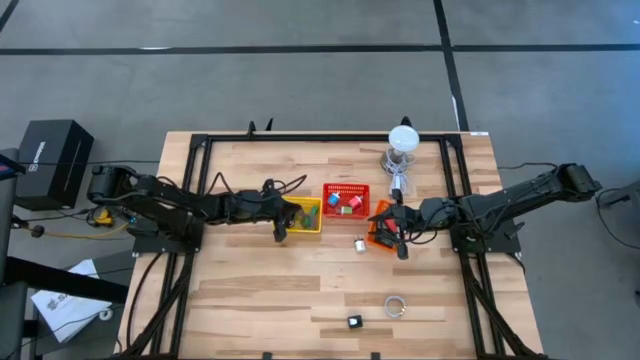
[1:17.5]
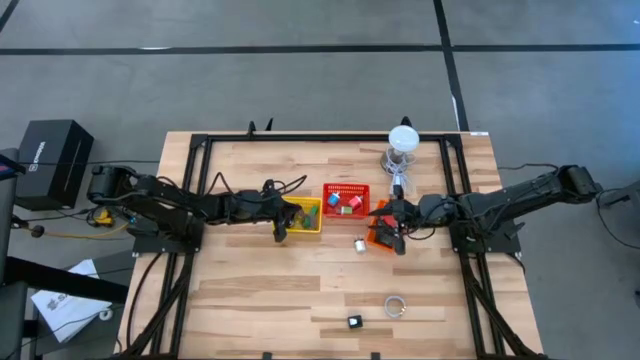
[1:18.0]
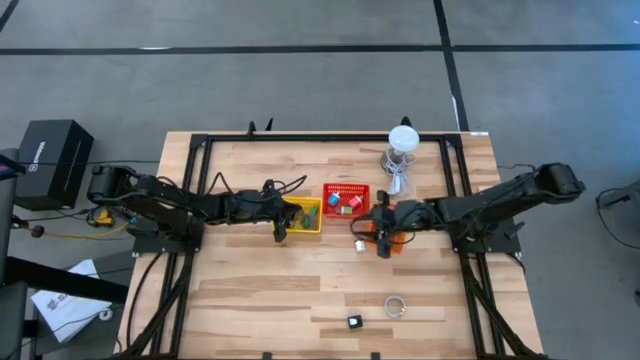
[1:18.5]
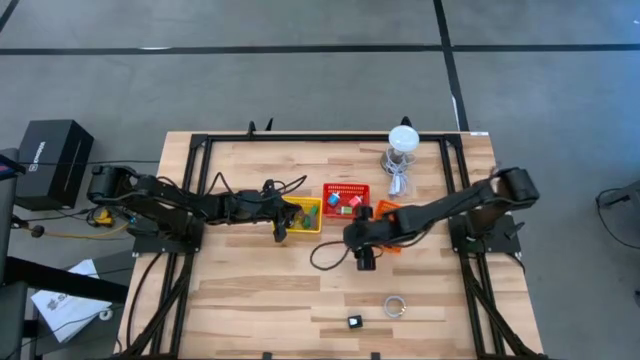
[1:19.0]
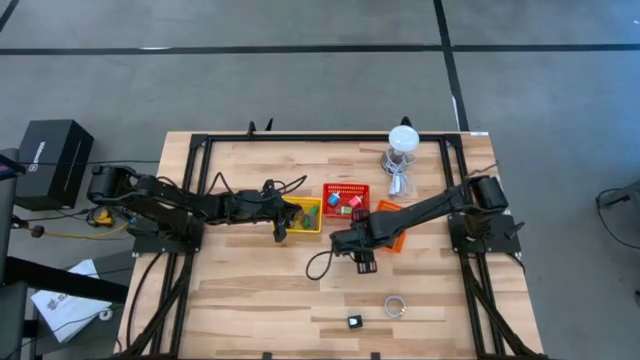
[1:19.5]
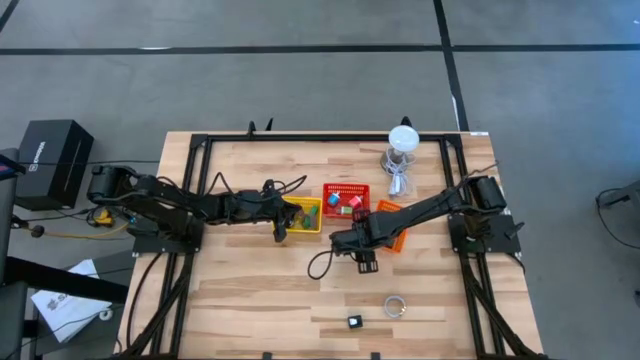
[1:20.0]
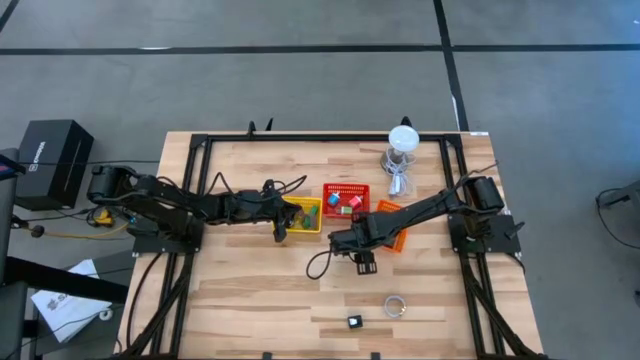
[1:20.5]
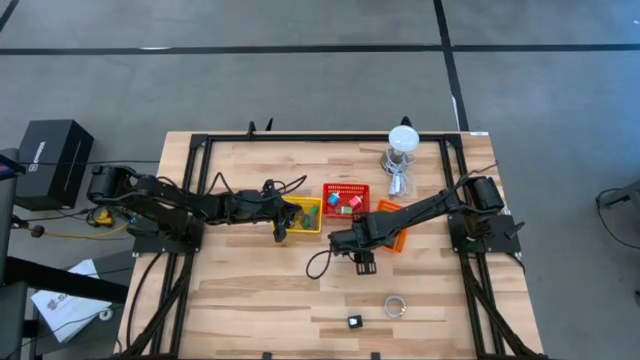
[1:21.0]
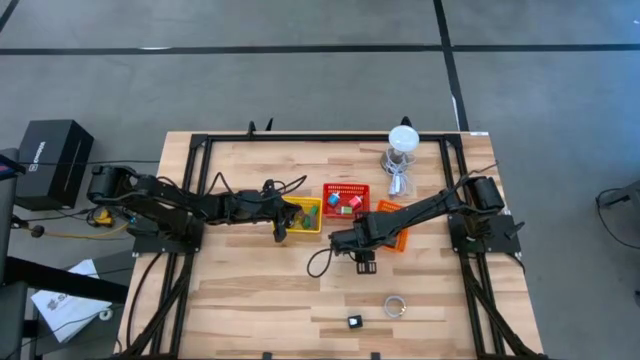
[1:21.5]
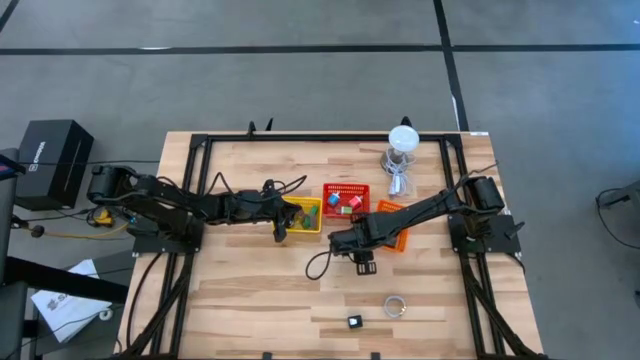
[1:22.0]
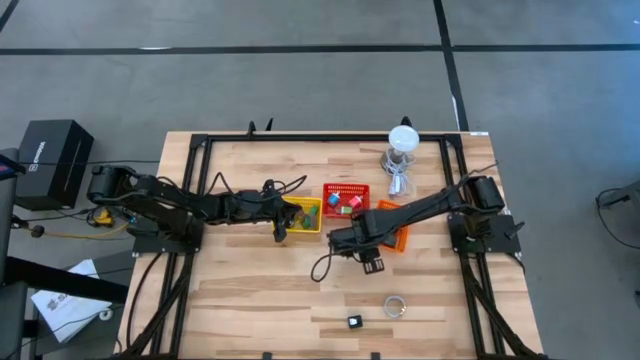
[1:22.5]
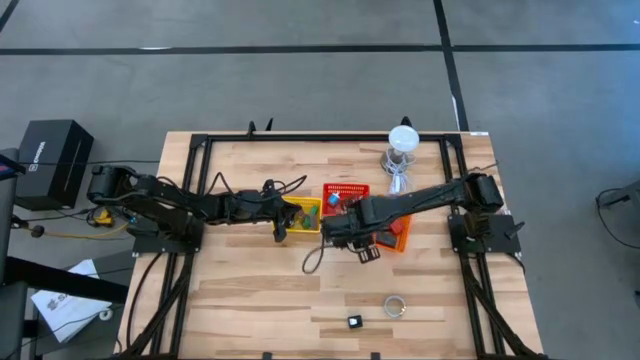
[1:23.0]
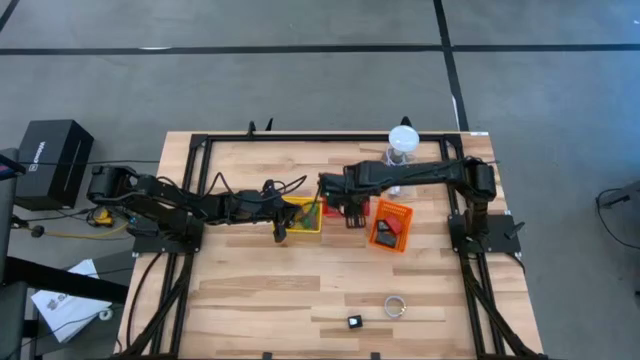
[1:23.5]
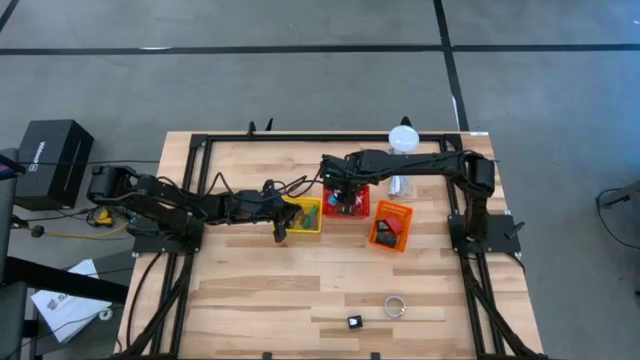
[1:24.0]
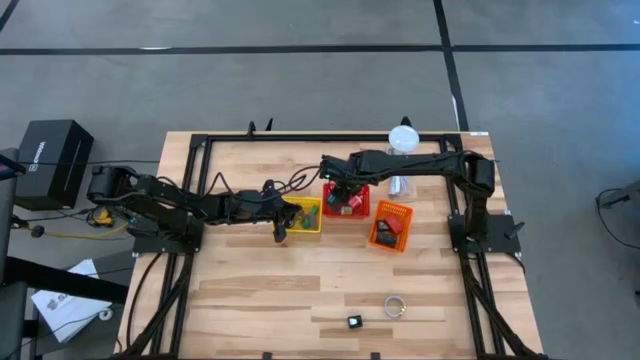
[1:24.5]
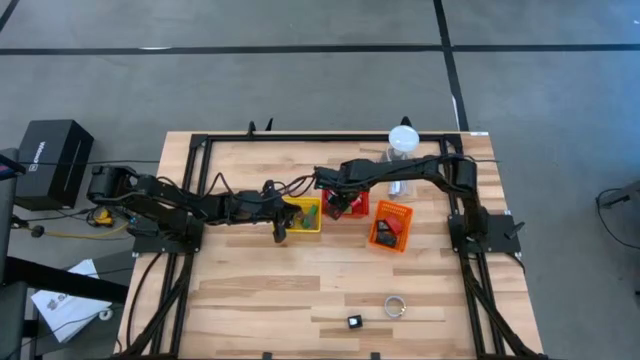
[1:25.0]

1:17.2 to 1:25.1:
Task: Pick & Place Office items
Put the white charger adapter into the red bin

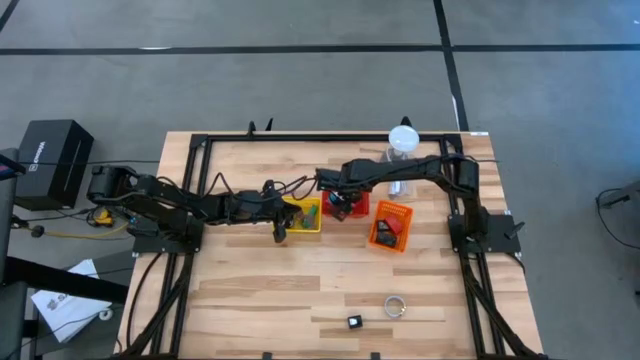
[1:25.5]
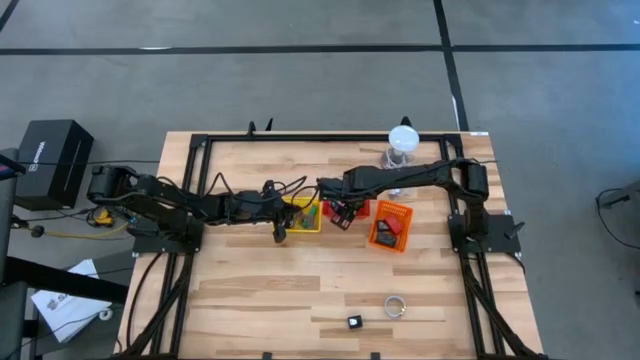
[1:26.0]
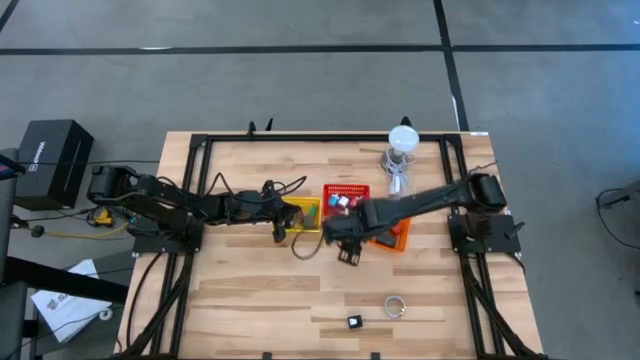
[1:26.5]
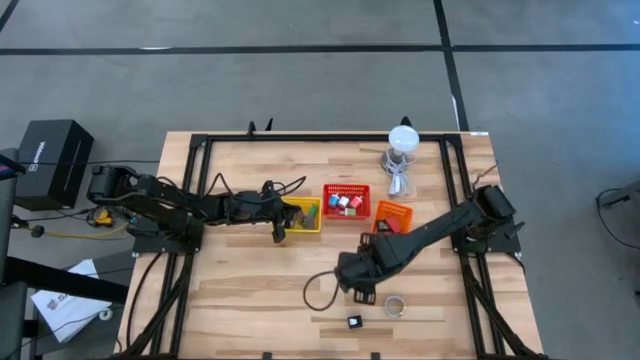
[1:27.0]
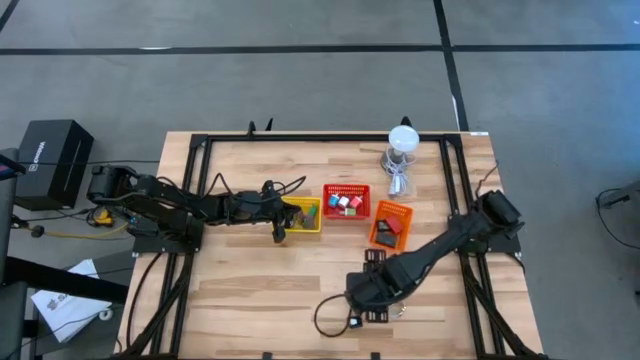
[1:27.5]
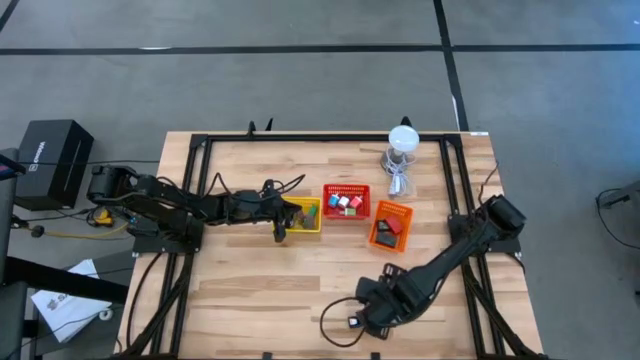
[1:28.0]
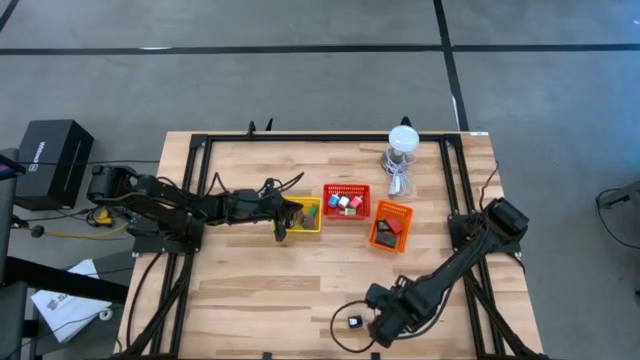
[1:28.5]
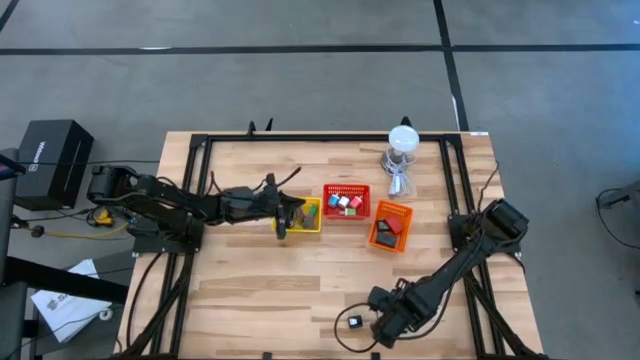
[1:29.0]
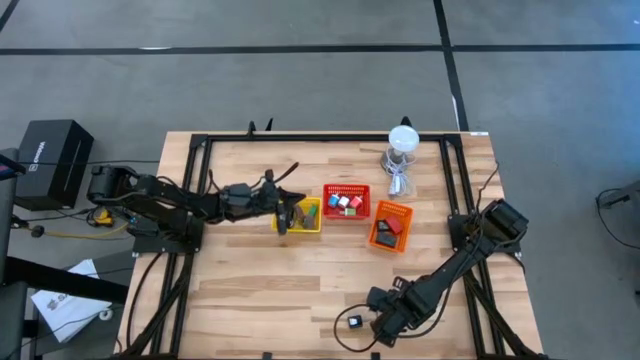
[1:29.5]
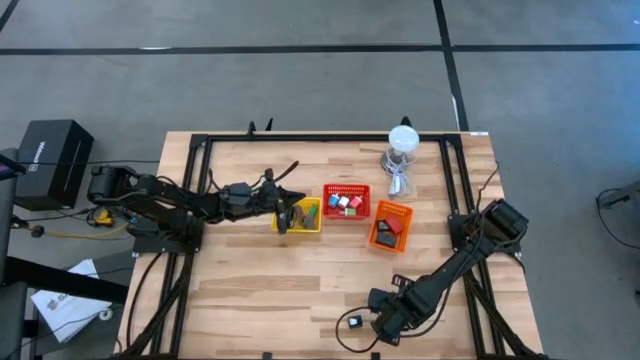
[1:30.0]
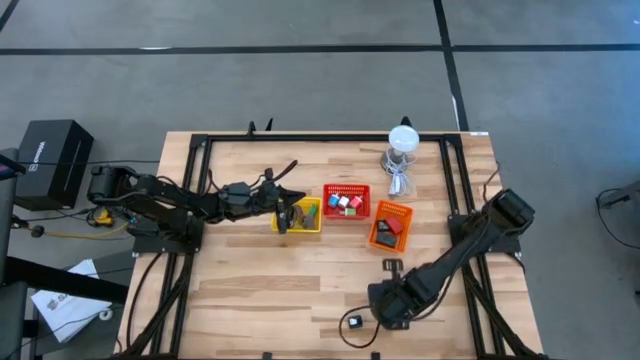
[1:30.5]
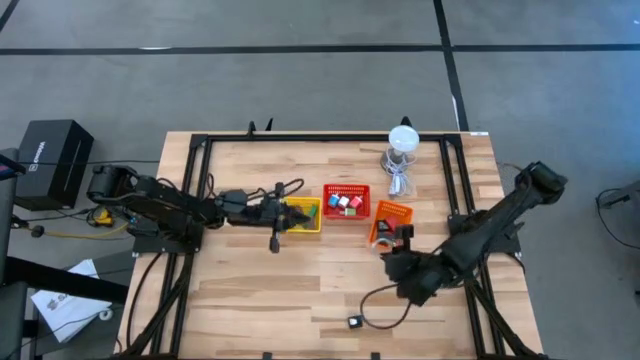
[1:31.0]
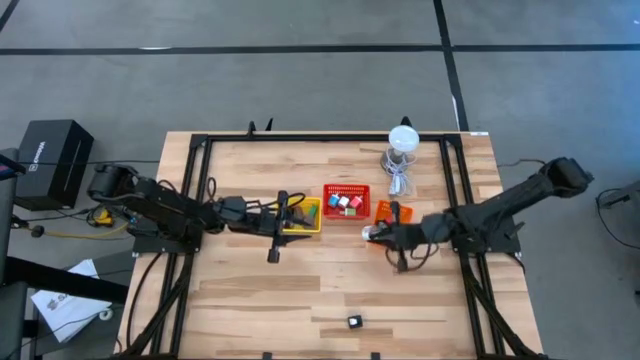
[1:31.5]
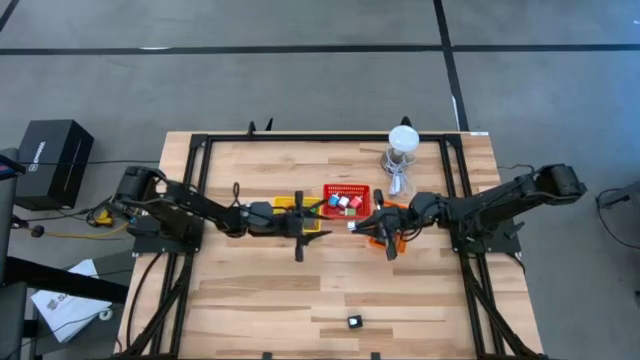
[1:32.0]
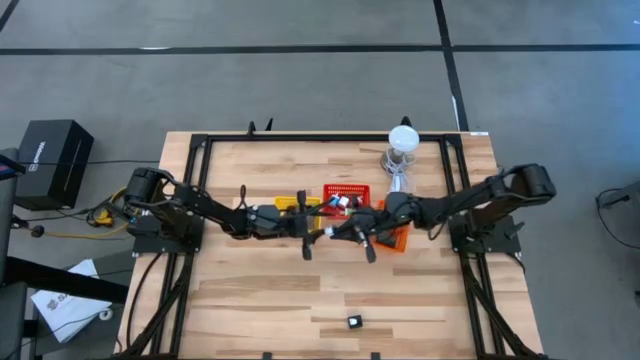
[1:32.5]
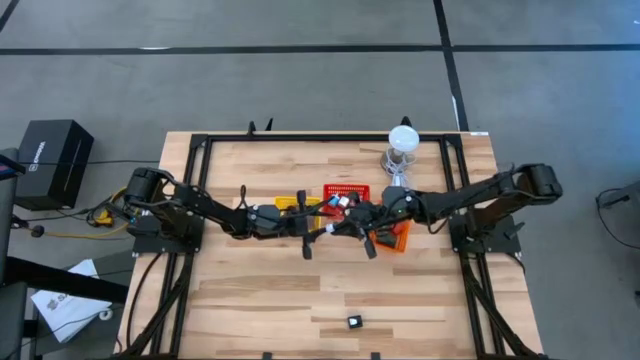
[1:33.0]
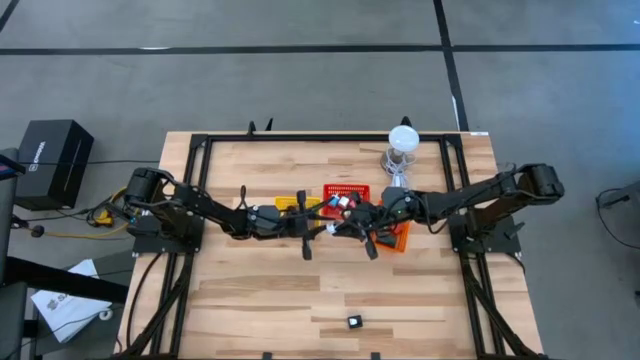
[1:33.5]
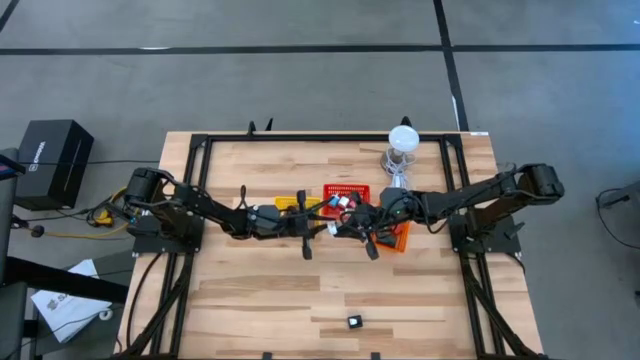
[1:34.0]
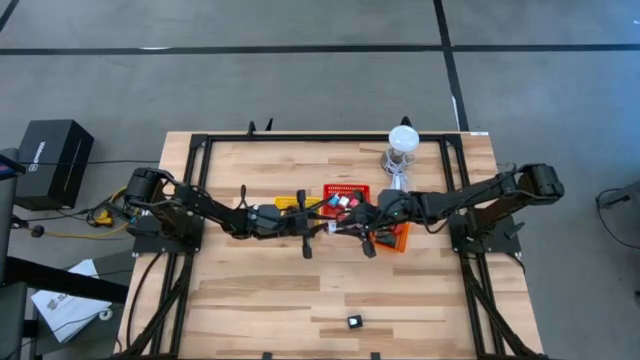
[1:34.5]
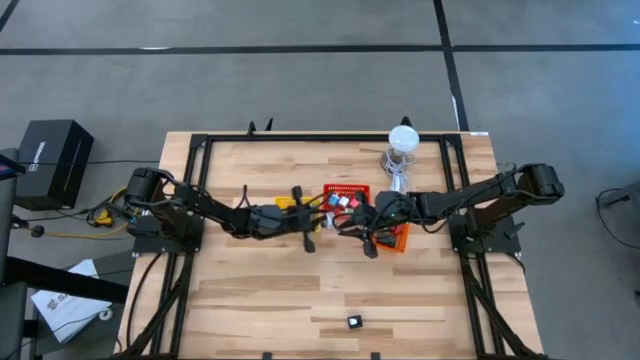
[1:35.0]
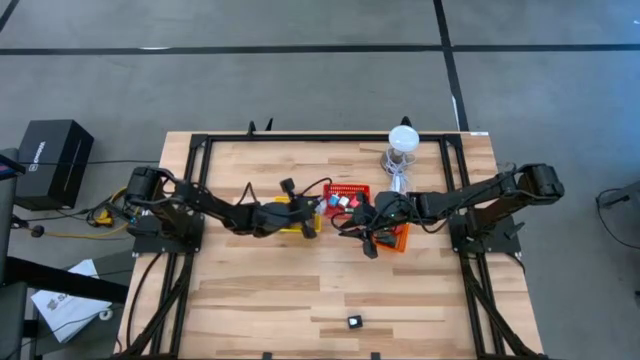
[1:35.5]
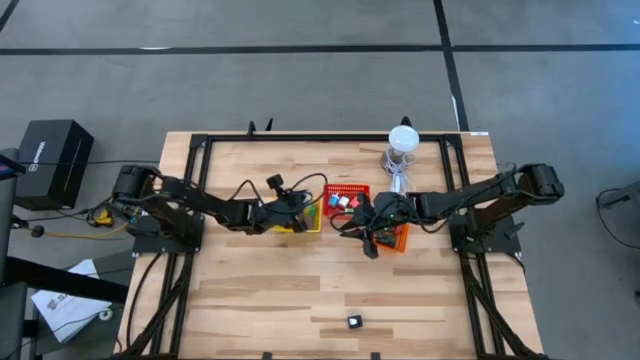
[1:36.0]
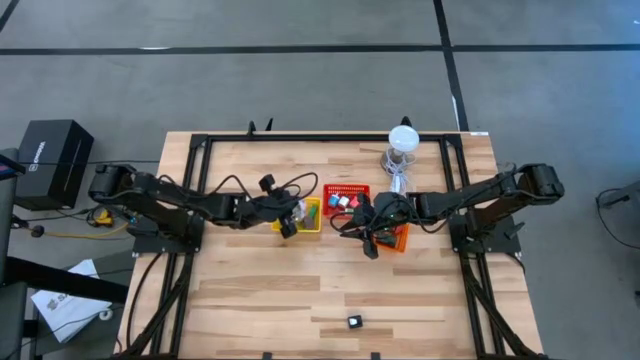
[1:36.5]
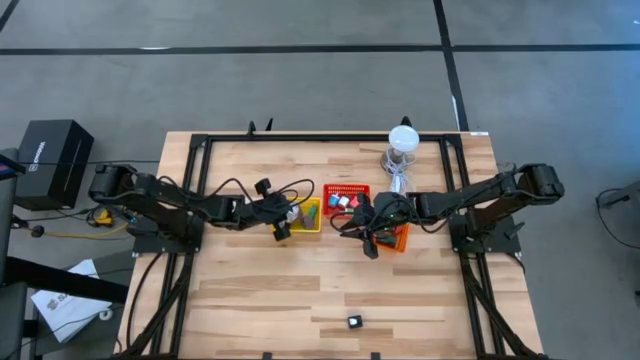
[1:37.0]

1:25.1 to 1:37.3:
Put the blue watch into the yellow bin
